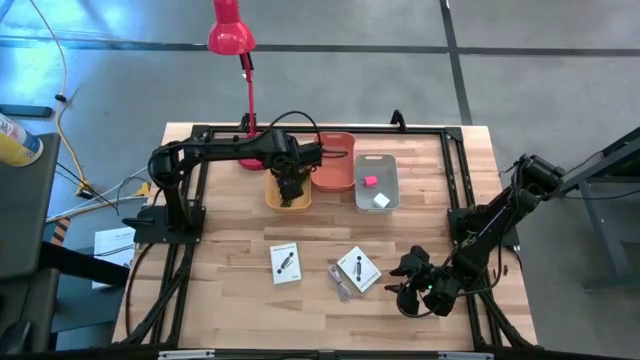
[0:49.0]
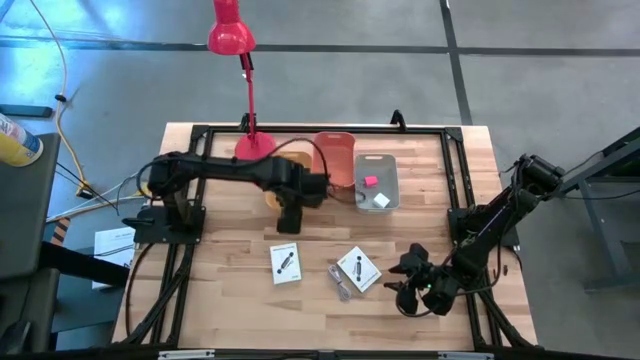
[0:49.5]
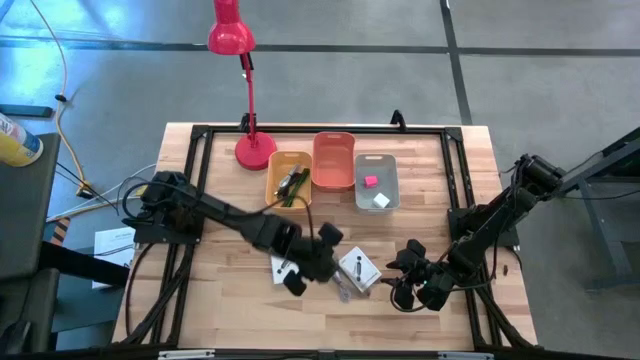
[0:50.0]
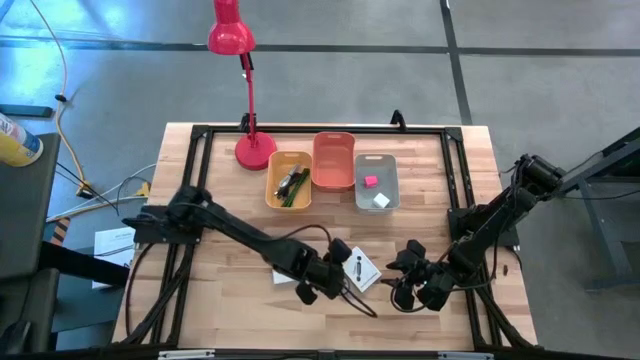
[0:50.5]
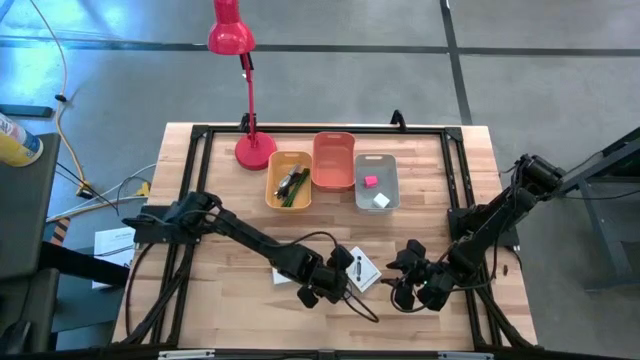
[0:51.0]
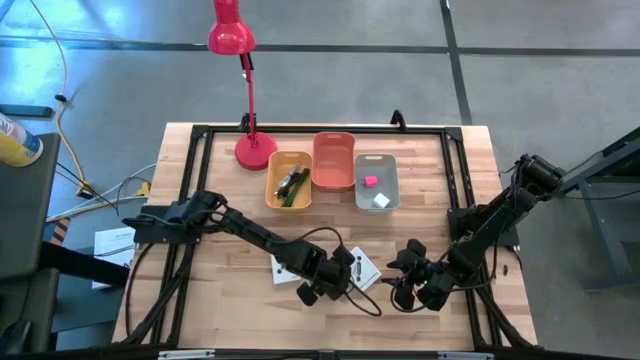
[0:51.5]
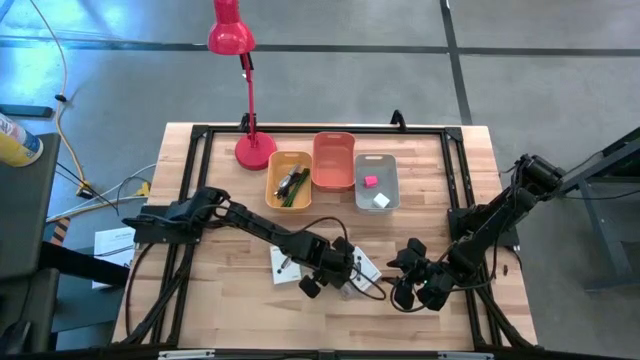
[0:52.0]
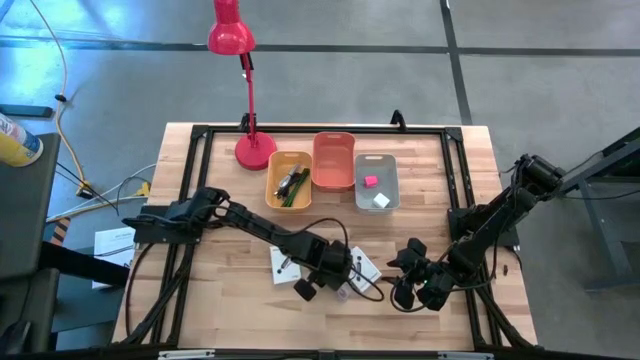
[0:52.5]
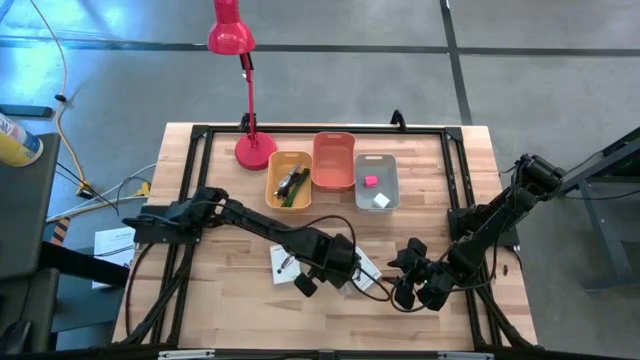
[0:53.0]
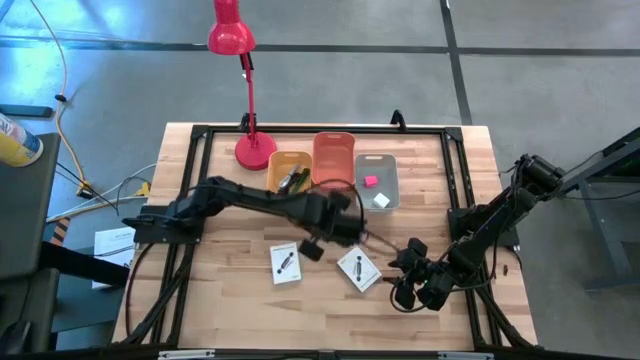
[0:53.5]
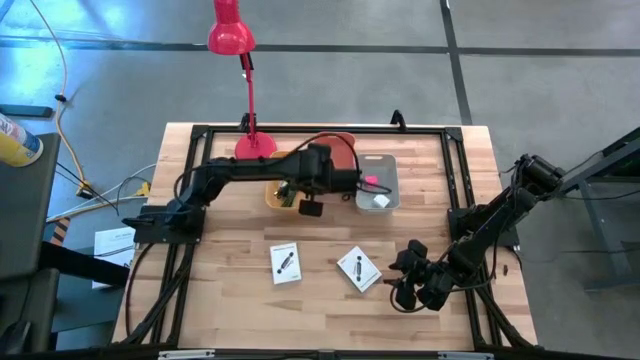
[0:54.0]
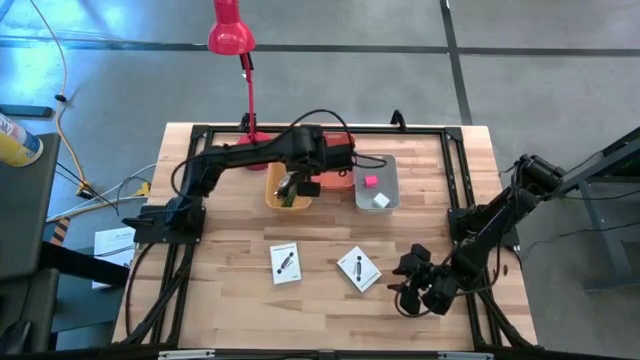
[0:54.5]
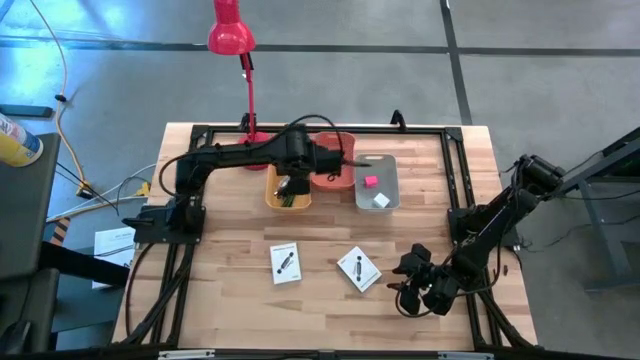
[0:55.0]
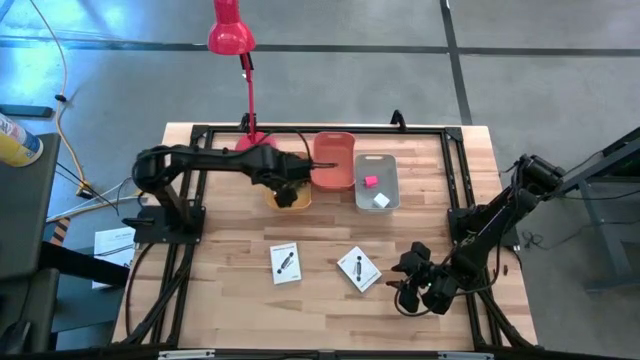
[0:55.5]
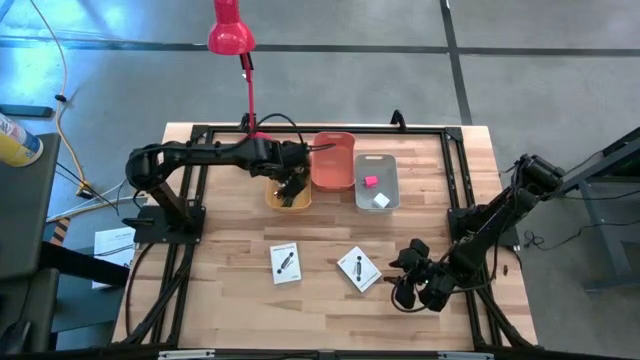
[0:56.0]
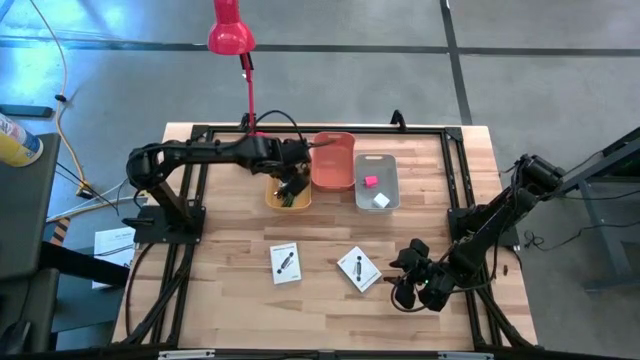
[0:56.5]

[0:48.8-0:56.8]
Task: Pick and place items into bin
Put the purple charger cable into the yellow bin

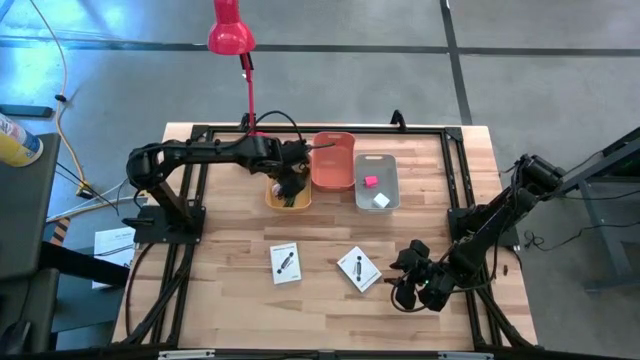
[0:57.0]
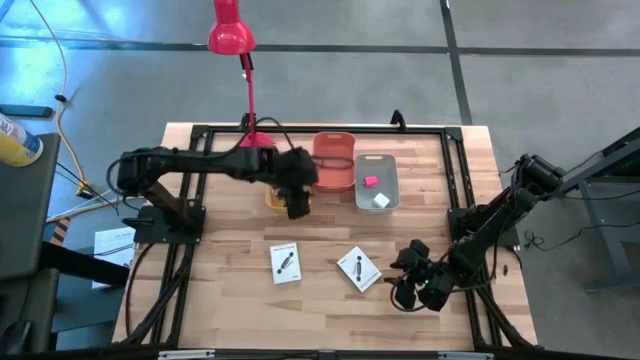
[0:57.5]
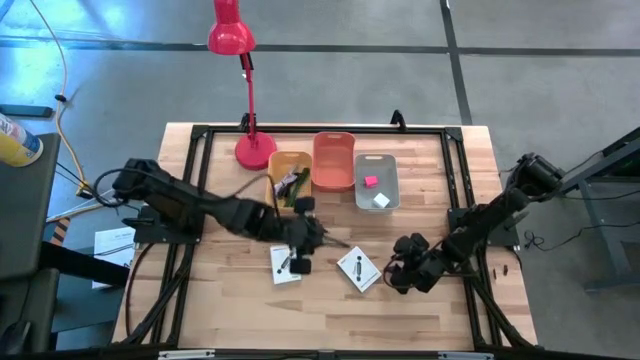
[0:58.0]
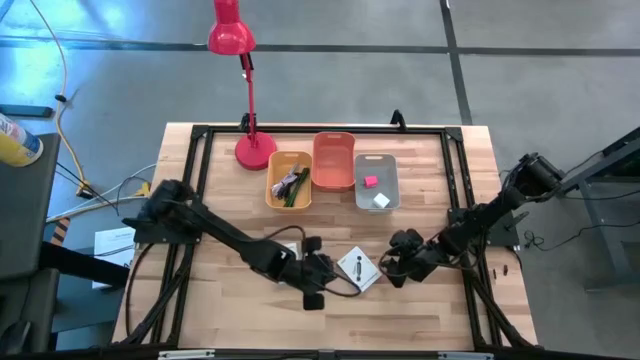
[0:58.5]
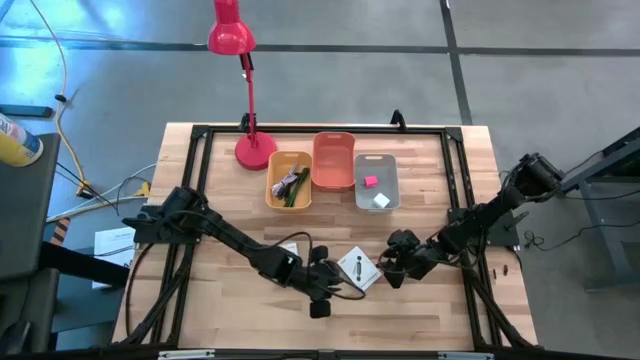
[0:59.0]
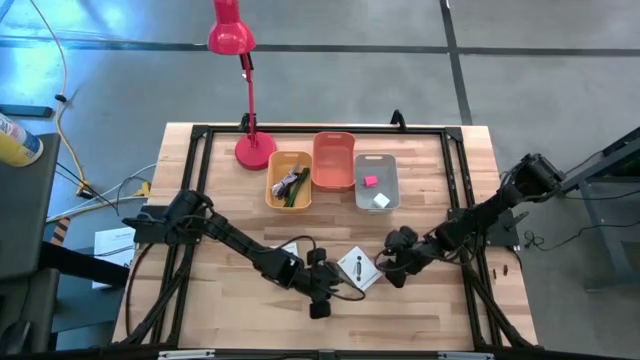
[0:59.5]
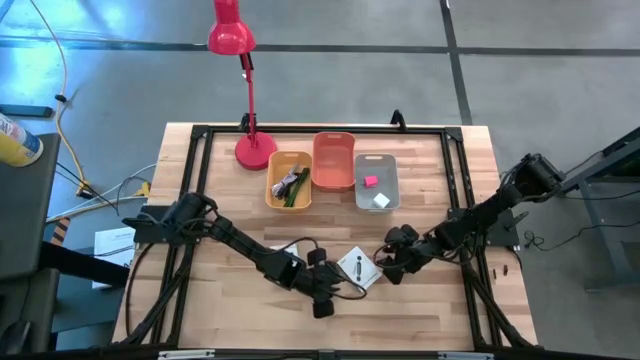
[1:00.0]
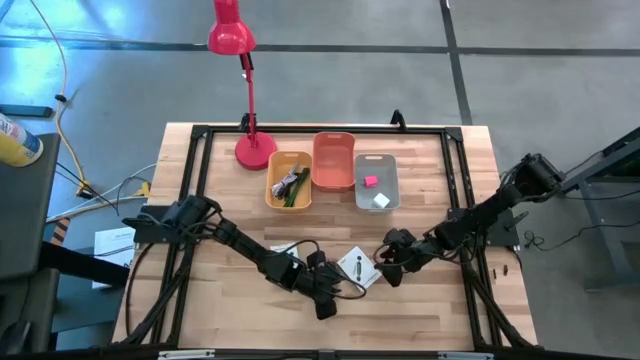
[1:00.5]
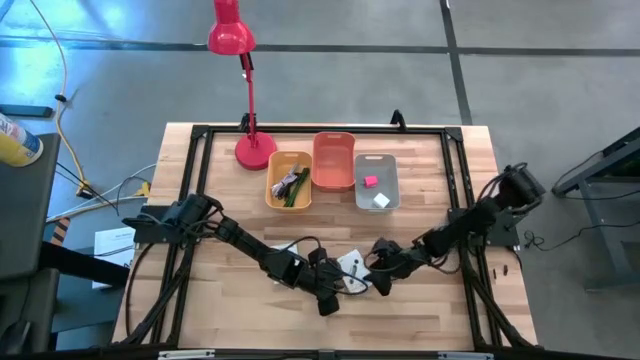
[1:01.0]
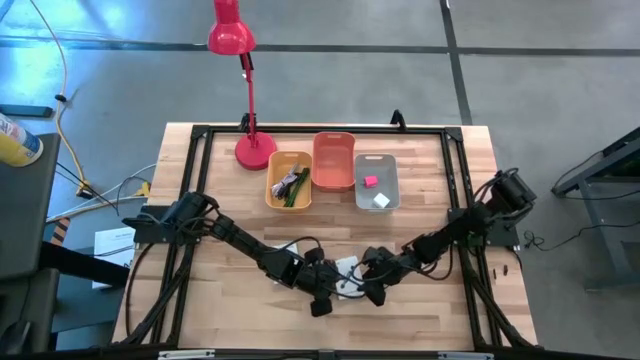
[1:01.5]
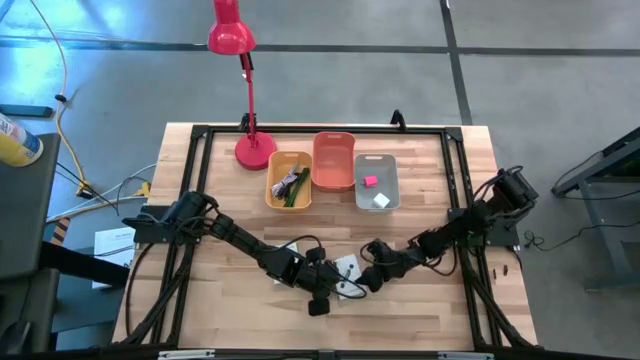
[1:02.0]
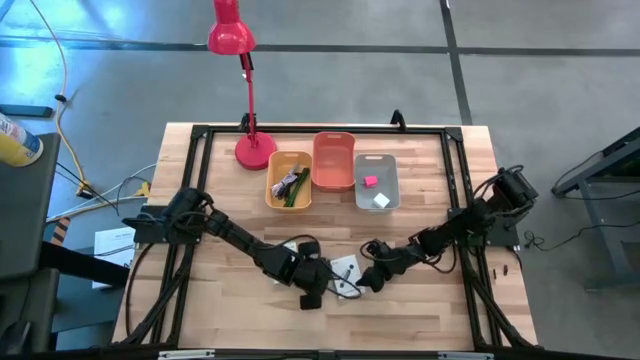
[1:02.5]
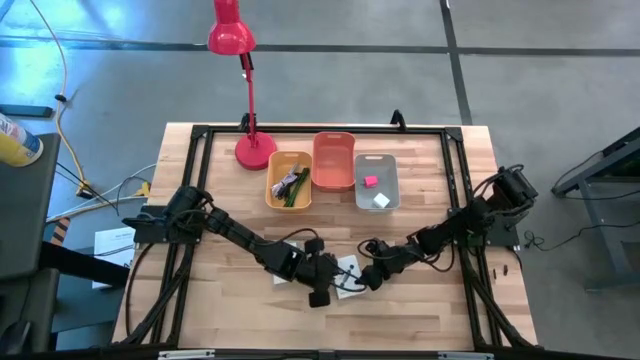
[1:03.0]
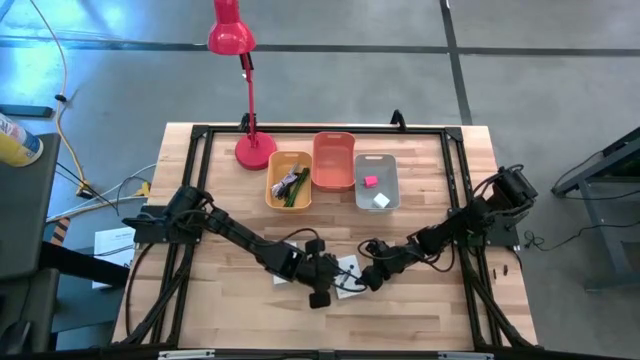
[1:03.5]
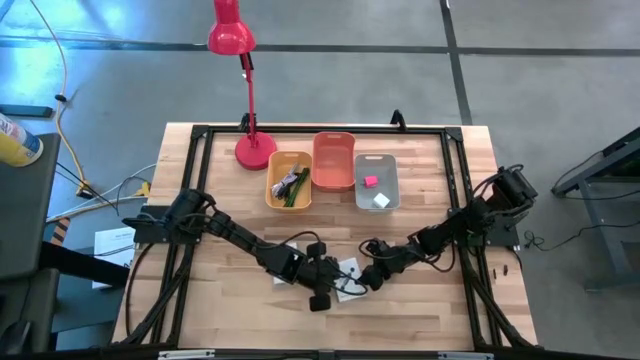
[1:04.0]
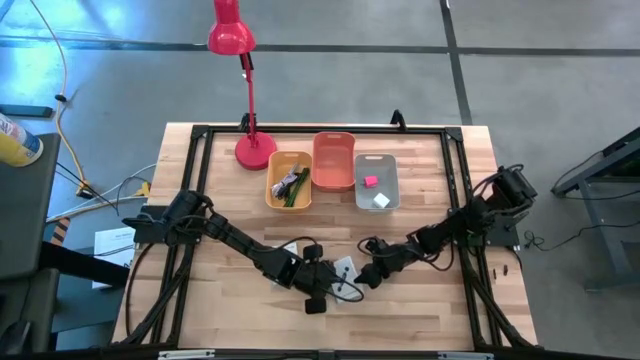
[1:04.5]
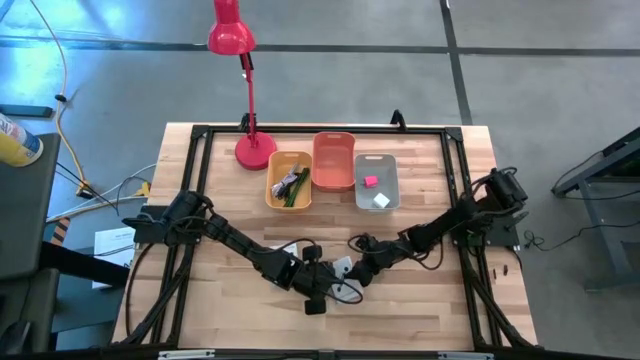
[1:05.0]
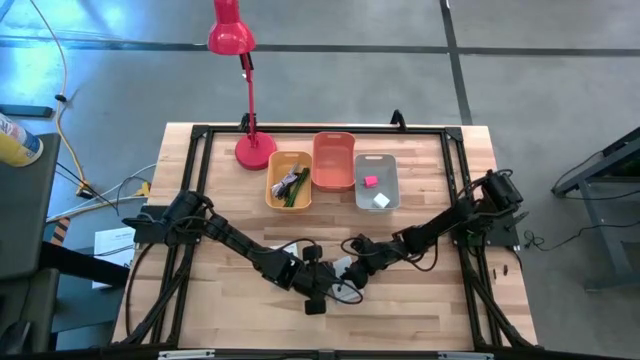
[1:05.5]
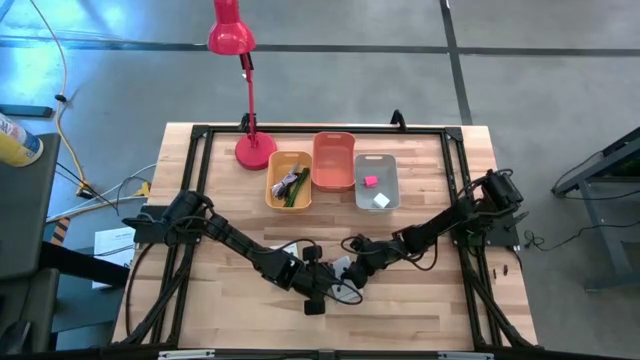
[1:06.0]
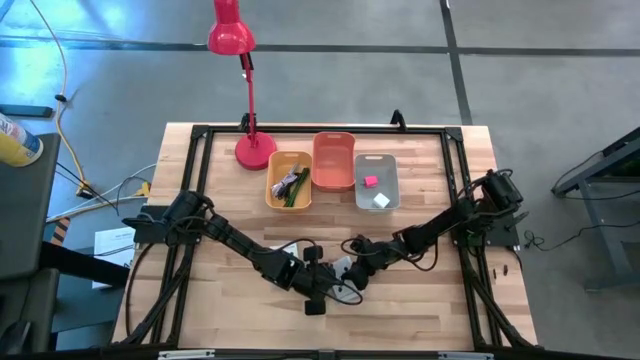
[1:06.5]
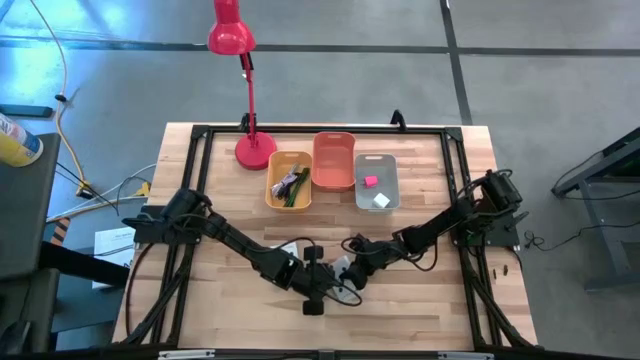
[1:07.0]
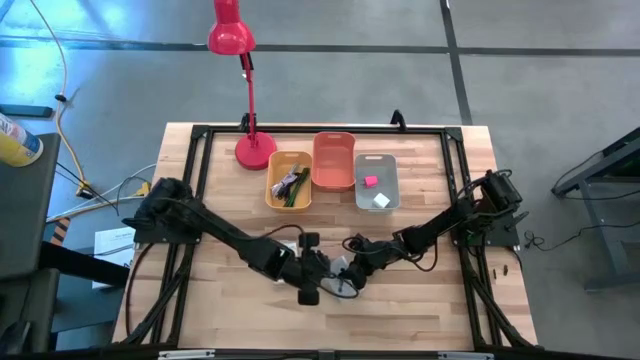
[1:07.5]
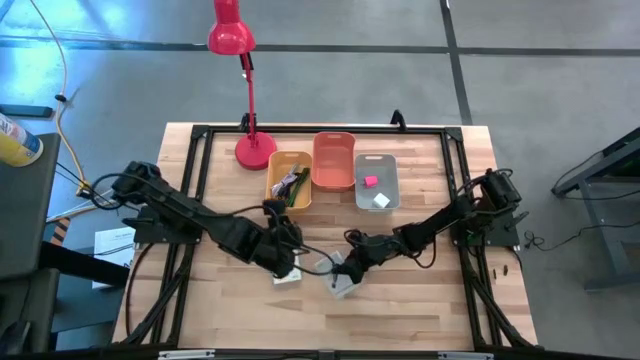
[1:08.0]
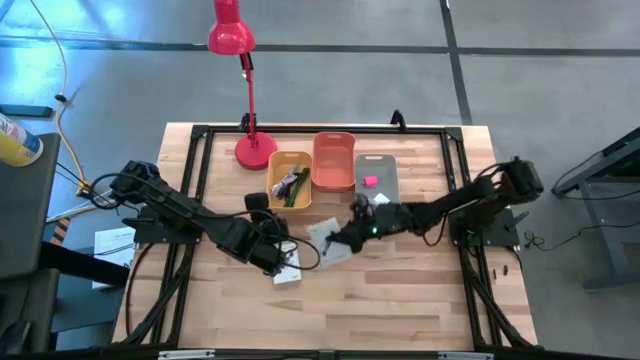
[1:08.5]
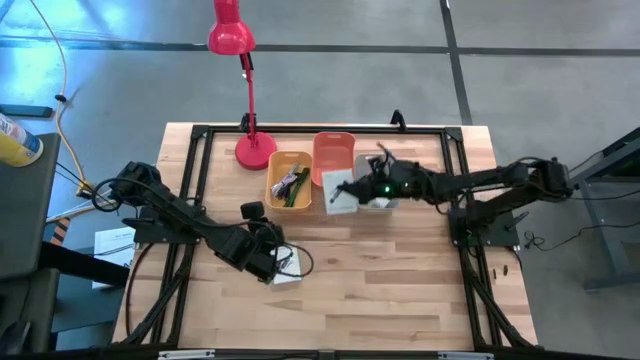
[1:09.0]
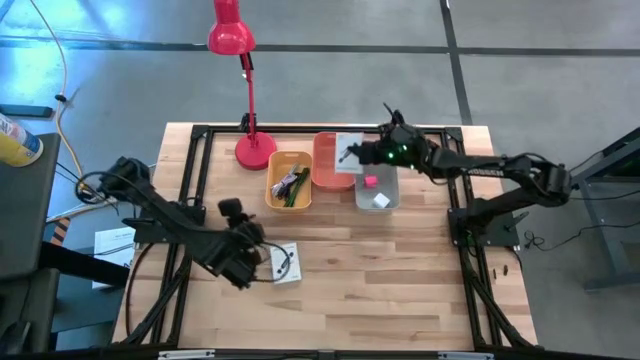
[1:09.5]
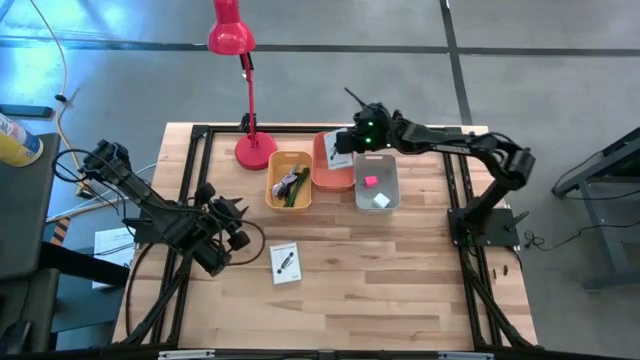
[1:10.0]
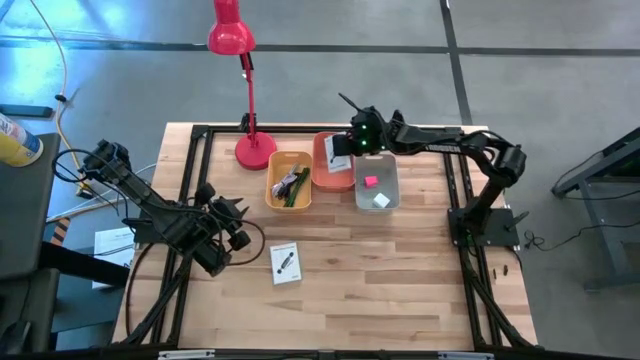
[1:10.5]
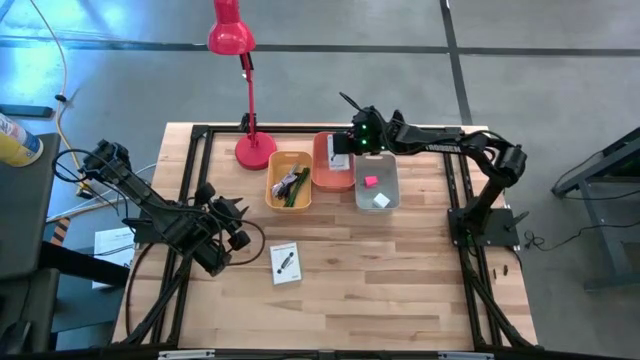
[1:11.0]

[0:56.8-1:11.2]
Put the right white card reader box into the orange bin
